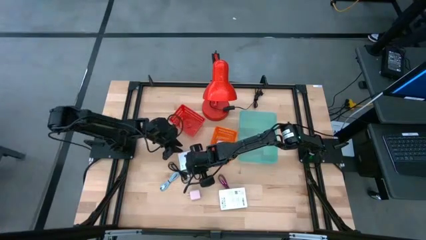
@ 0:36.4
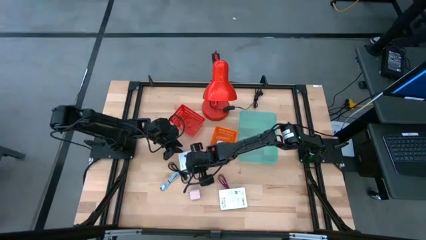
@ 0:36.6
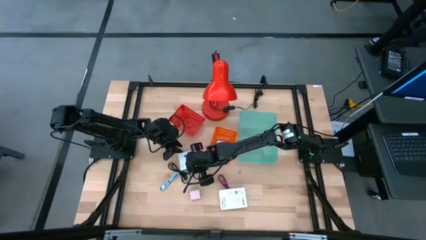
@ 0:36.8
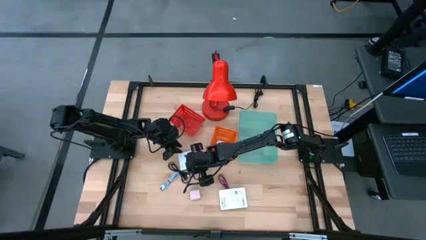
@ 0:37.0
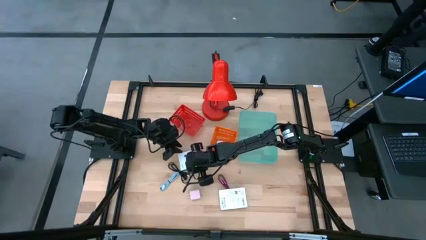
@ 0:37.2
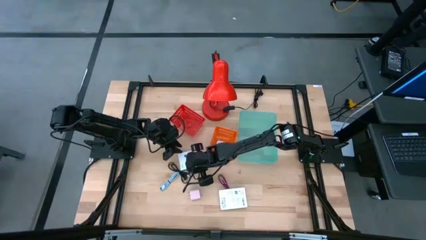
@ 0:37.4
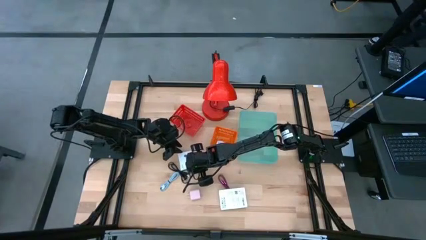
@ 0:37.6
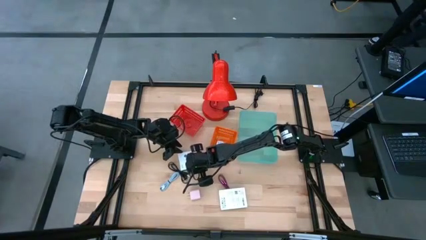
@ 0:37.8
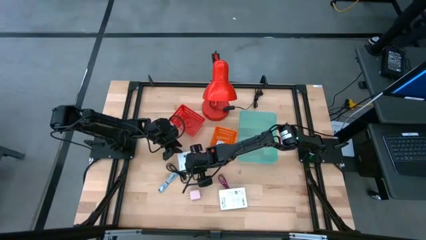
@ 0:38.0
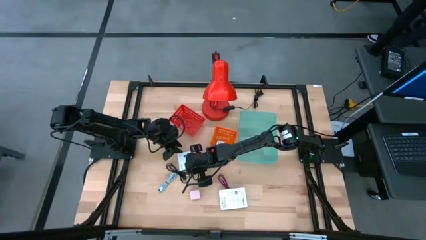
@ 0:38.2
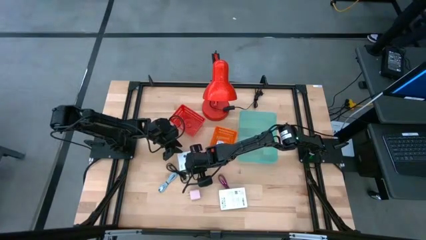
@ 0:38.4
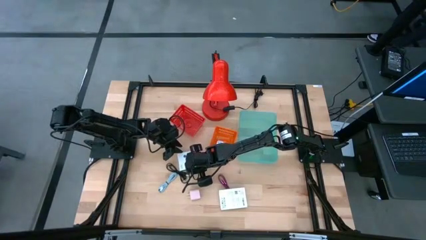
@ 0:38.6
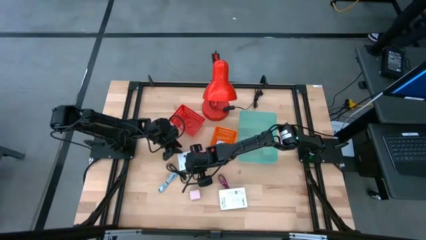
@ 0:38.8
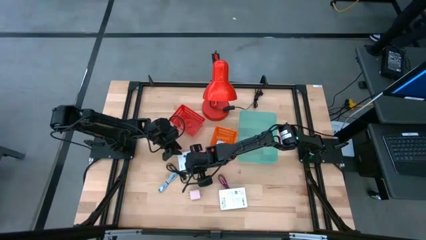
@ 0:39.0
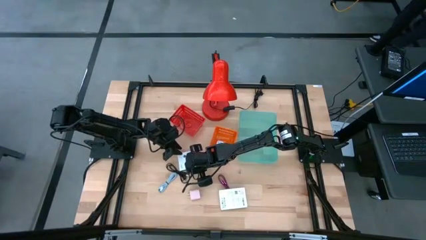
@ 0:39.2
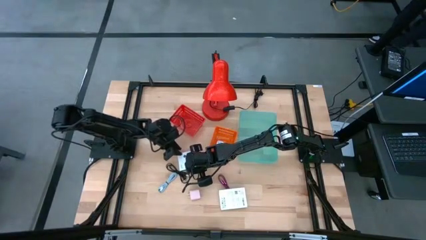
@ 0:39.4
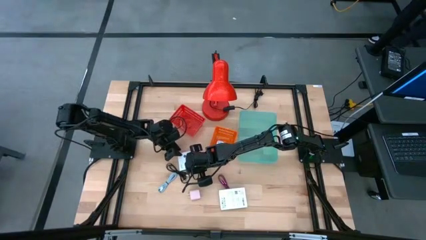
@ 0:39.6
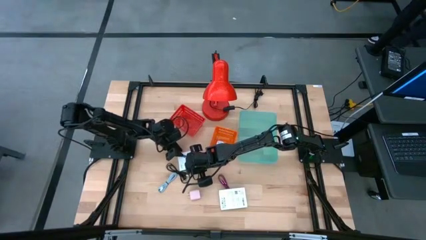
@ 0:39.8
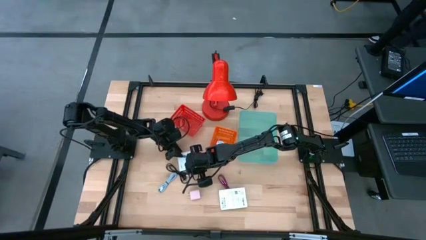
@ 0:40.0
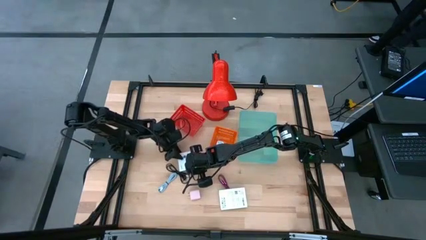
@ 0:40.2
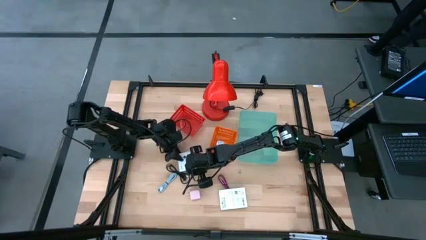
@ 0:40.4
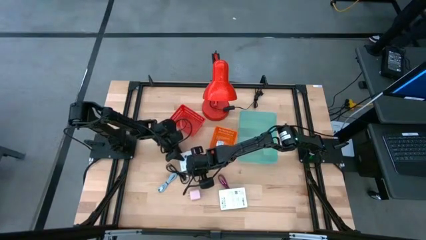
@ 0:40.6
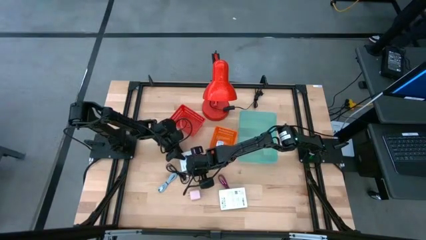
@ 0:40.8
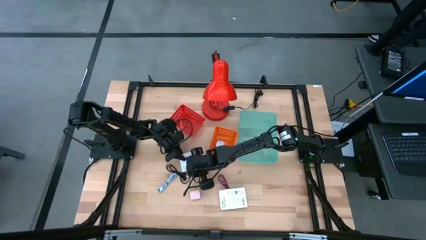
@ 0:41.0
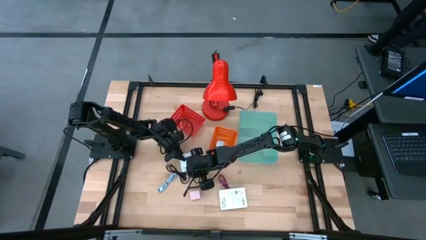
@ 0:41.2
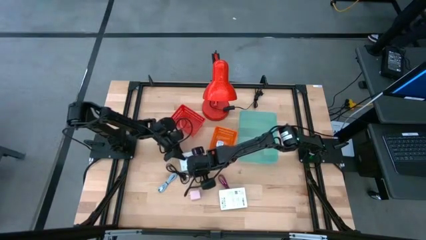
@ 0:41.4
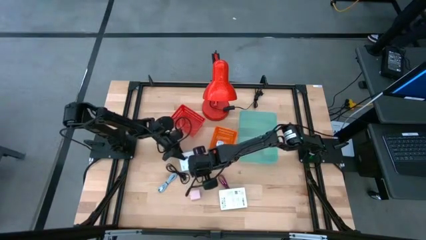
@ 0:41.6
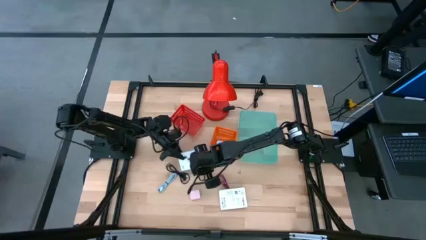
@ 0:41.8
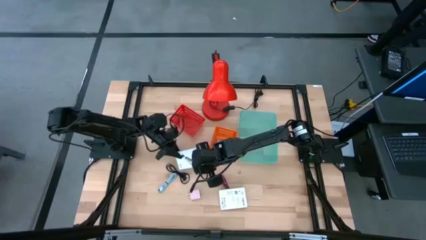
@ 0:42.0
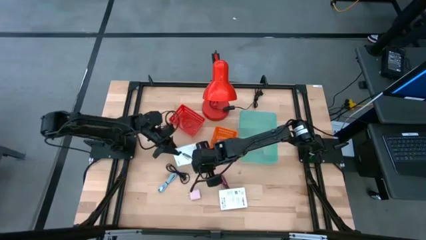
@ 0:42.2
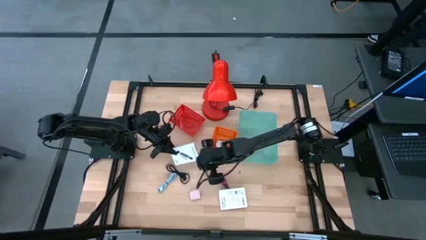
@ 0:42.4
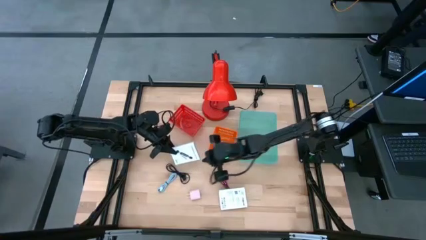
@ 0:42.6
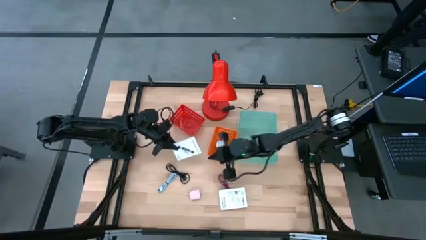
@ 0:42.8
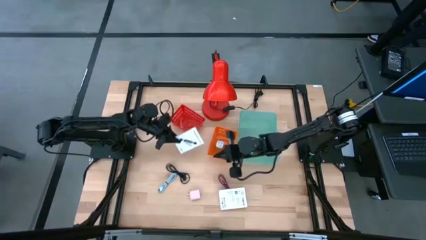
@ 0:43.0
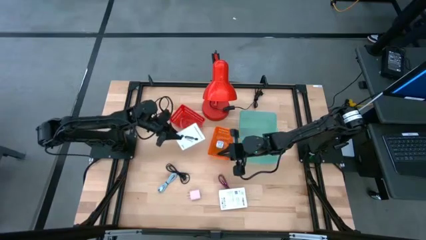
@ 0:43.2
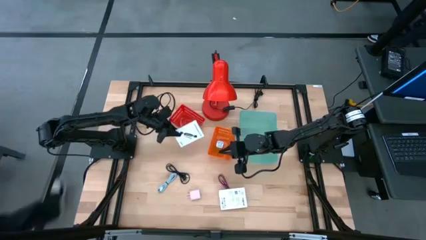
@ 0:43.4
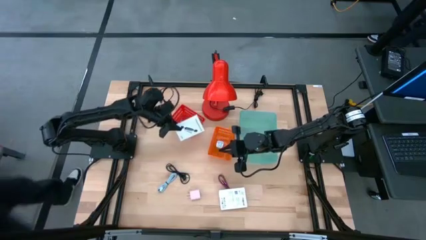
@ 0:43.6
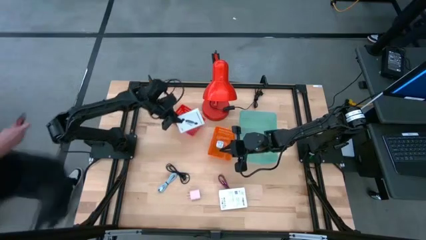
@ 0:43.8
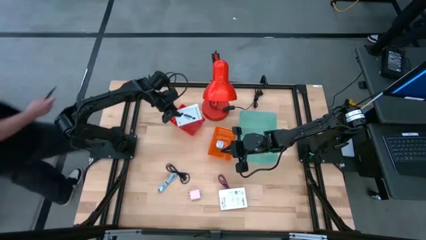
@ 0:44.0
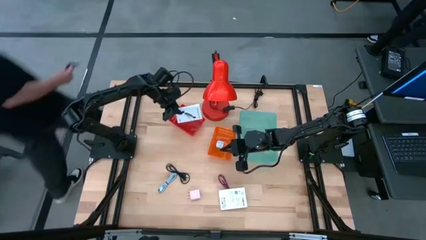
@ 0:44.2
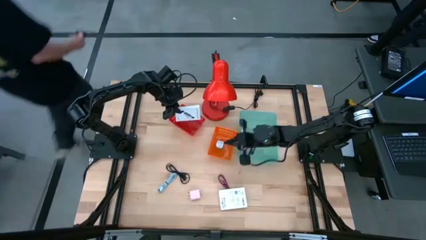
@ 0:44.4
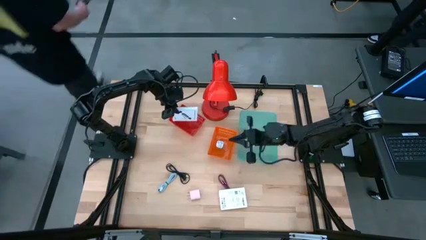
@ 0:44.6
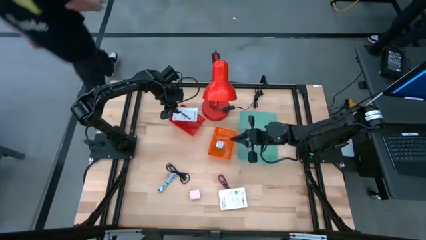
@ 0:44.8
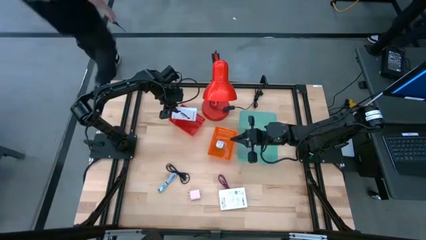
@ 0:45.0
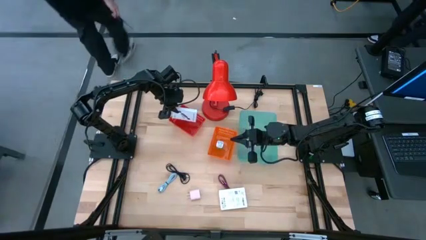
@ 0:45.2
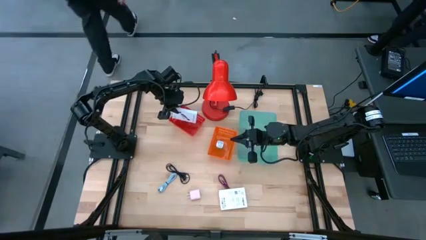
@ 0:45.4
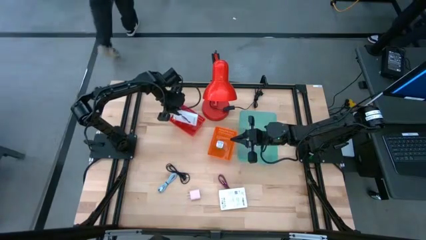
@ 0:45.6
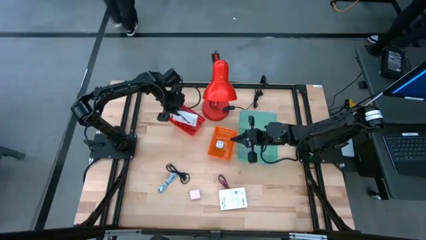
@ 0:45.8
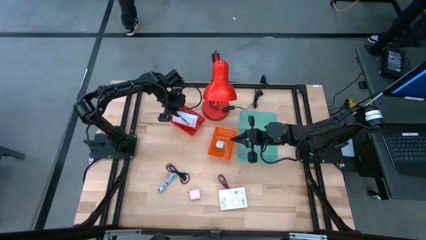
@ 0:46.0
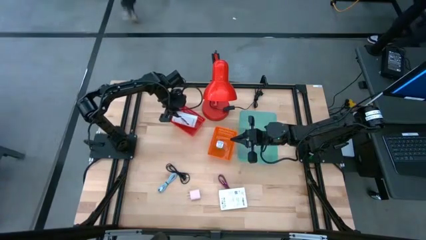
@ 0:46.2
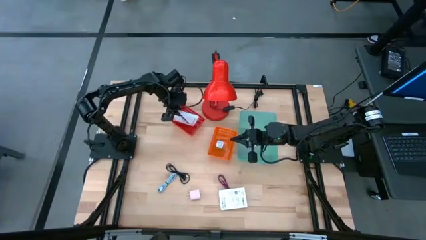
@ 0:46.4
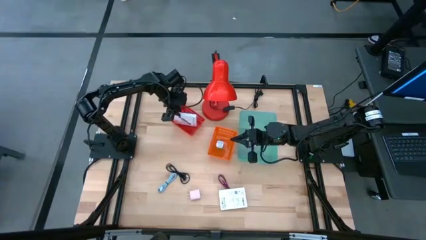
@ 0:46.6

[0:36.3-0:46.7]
Task: Pick and place items into bin
Put the top card reader box into the red bin

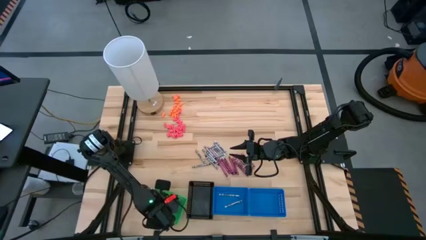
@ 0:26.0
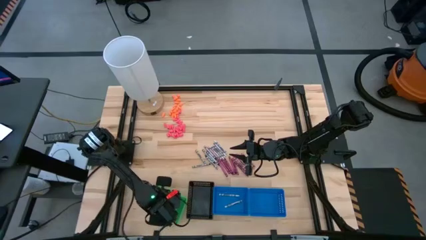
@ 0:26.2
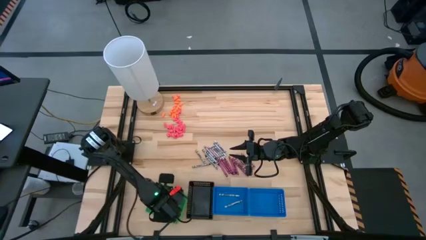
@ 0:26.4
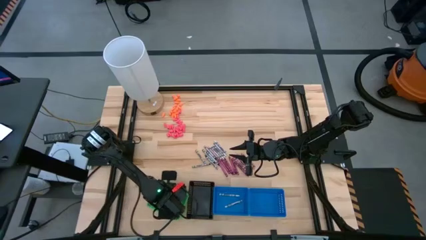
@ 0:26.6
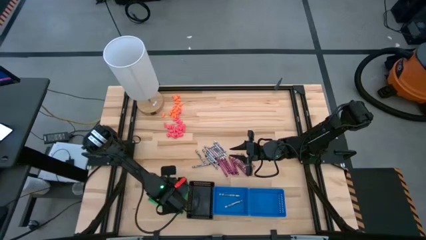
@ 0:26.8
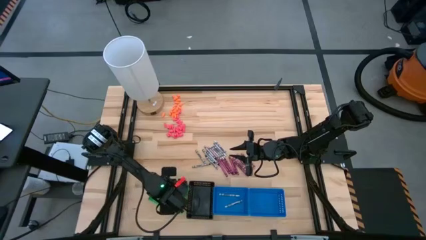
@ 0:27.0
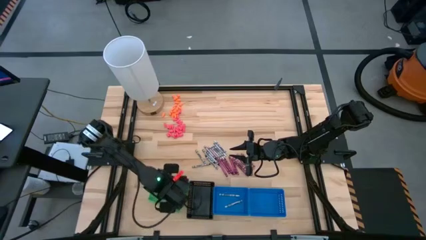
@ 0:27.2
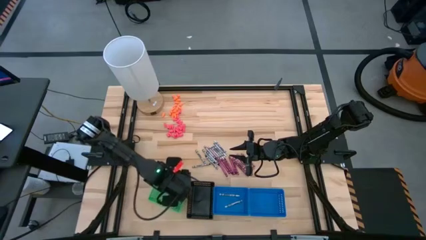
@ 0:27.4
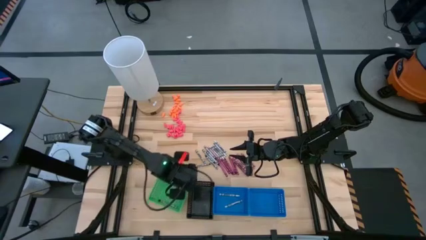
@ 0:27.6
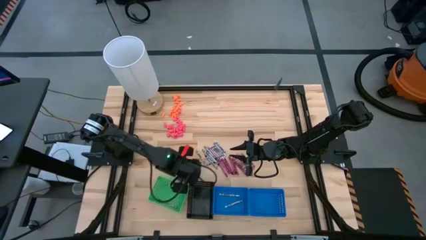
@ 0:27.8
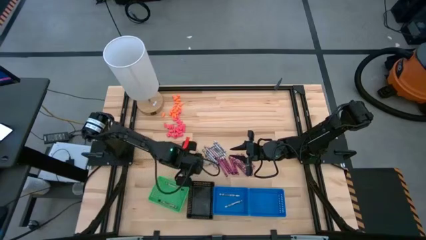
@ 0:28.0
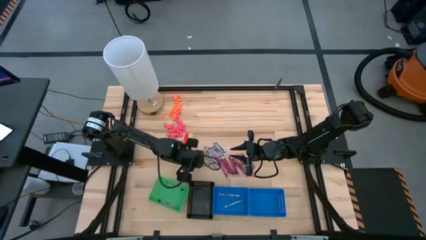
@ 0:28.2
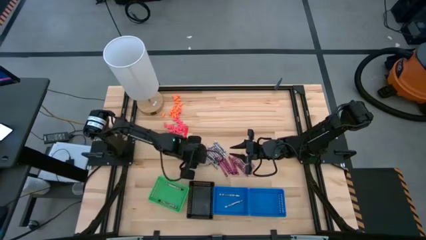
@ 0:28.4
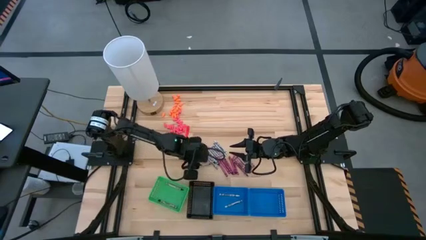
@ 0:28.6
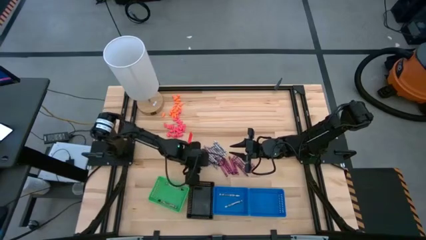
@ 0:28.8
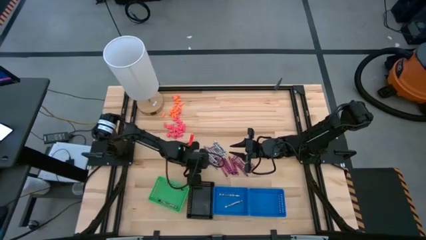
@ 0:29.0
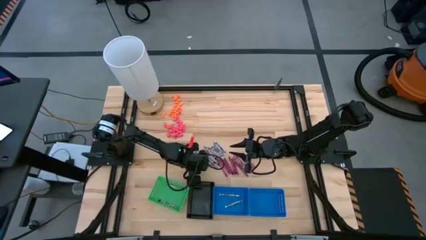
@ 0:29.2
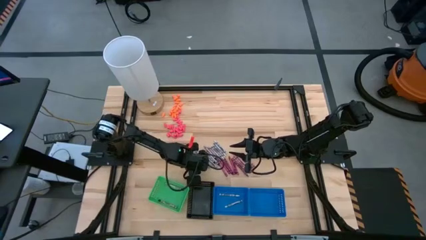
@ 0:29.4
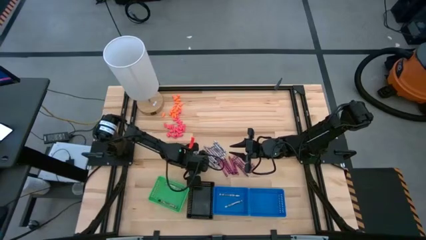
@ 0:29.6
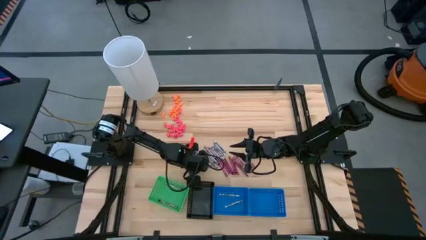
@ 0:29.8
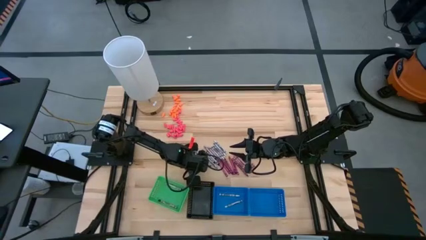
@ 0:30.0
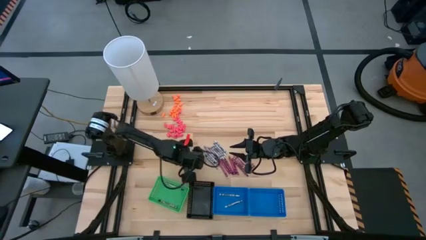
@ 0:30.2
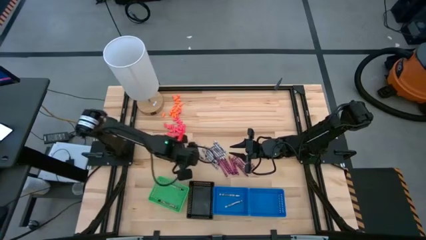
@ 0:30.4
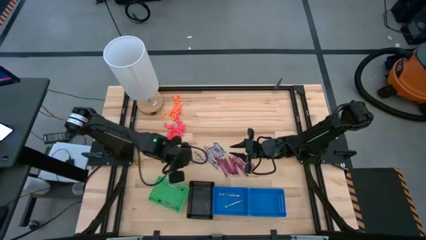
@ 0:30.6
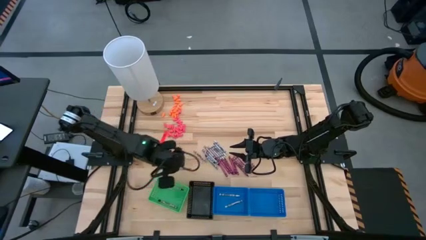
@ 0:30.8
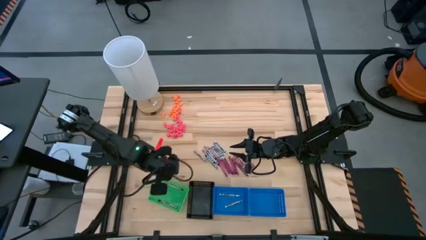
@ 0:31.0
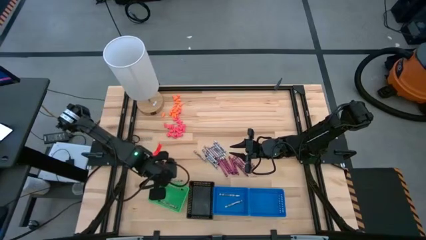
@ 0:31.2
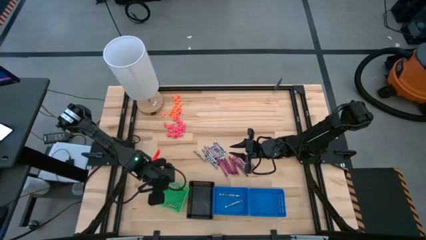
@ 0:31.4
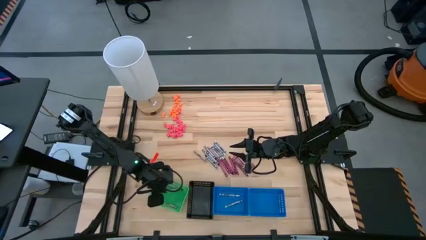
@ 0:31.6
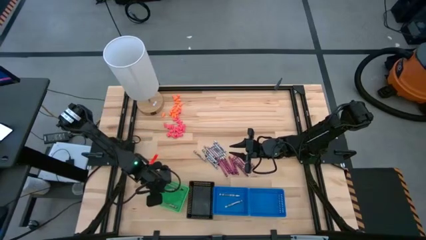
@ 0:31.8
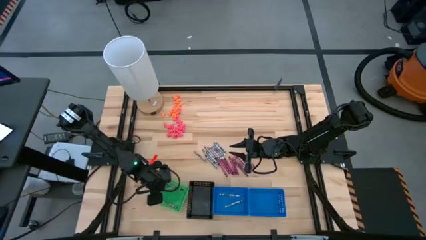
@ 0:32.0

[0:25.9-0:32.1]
Task: Sort crayons
Put the black crayon into the green bin
